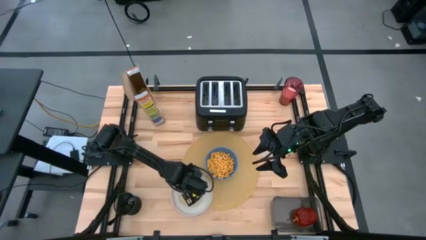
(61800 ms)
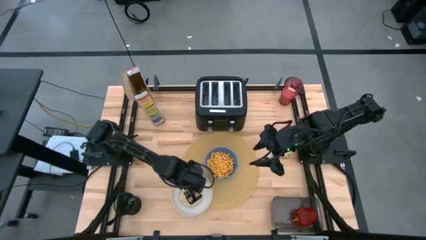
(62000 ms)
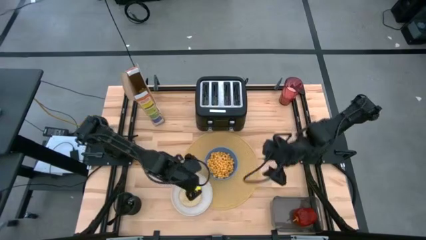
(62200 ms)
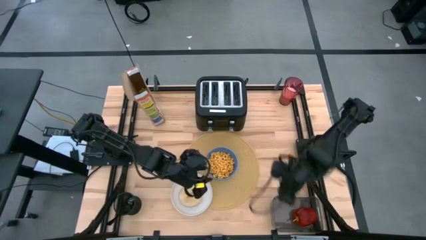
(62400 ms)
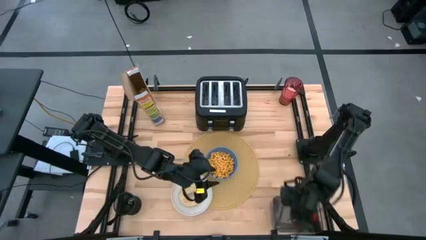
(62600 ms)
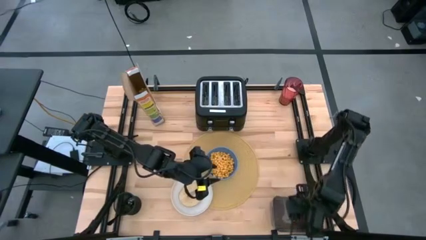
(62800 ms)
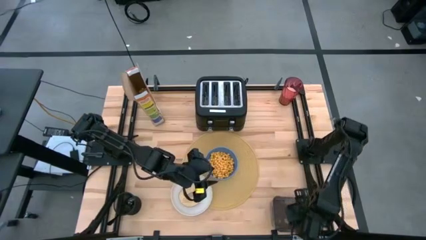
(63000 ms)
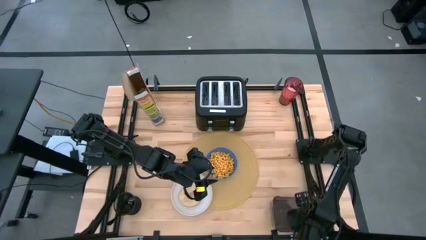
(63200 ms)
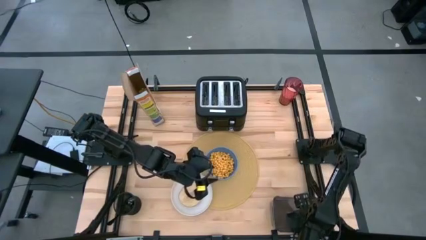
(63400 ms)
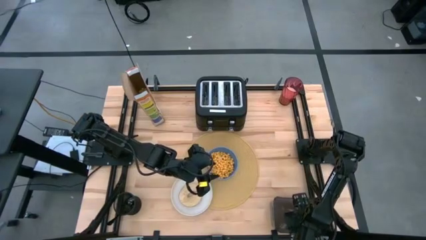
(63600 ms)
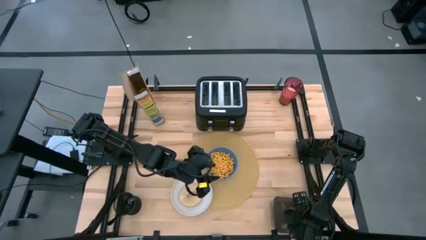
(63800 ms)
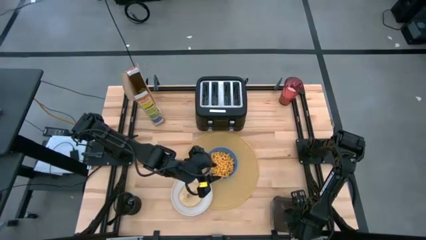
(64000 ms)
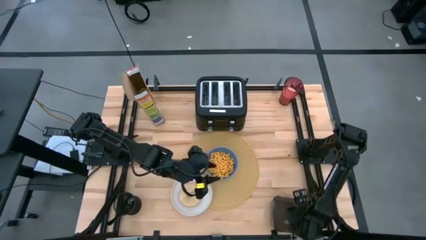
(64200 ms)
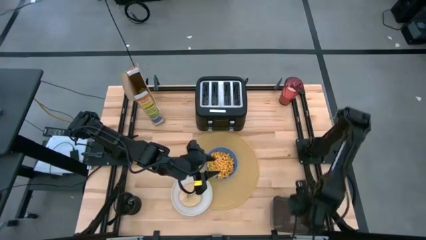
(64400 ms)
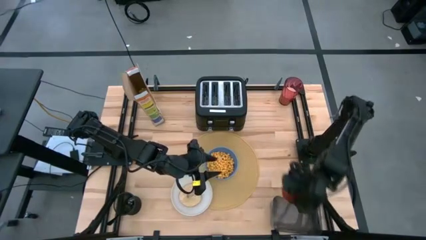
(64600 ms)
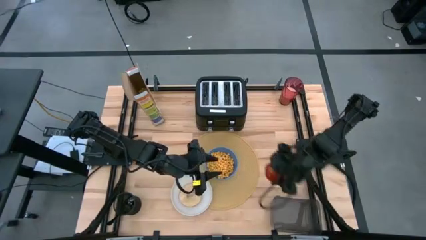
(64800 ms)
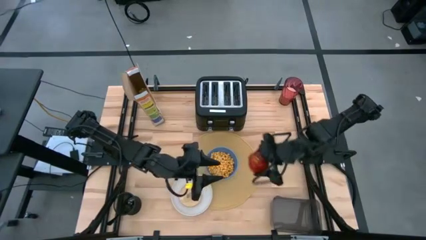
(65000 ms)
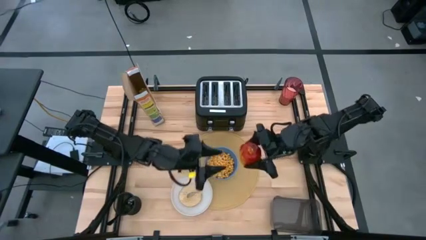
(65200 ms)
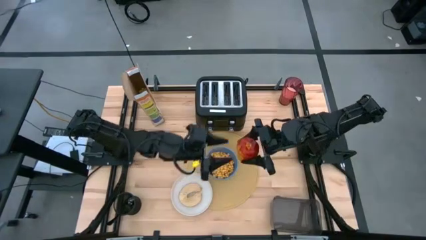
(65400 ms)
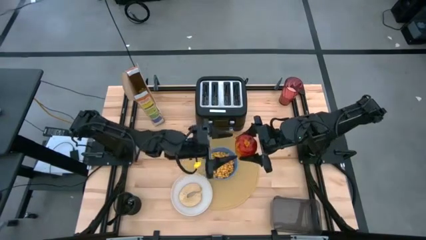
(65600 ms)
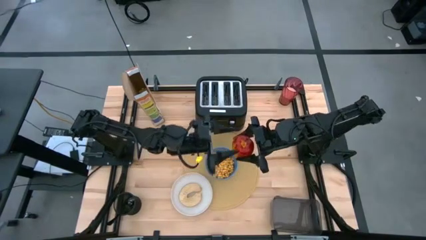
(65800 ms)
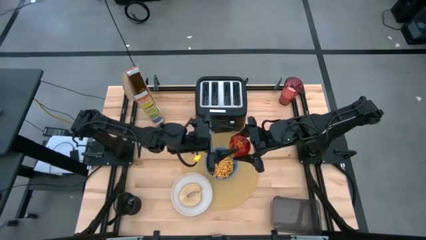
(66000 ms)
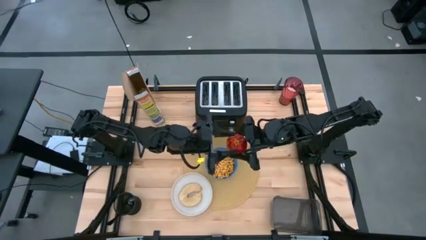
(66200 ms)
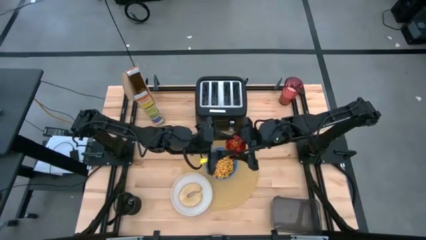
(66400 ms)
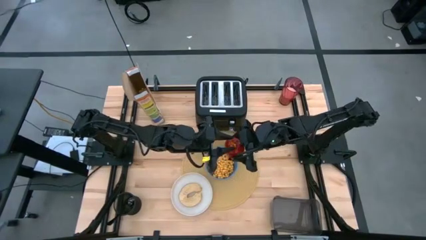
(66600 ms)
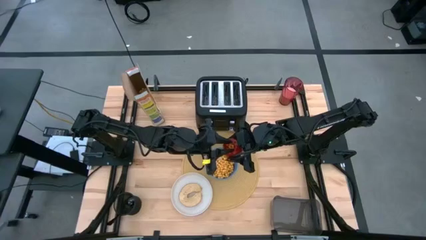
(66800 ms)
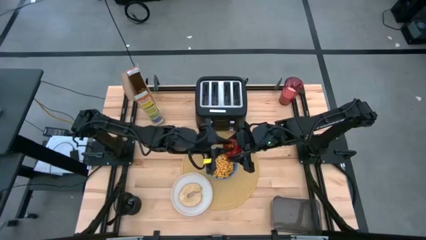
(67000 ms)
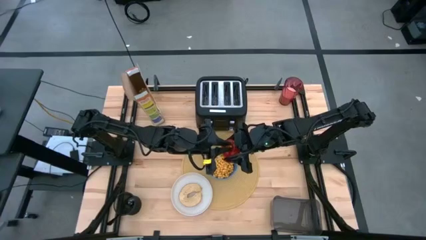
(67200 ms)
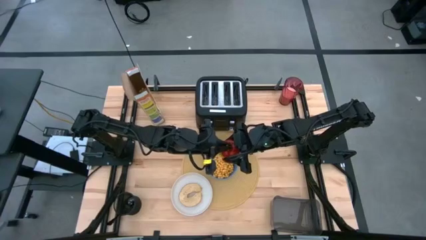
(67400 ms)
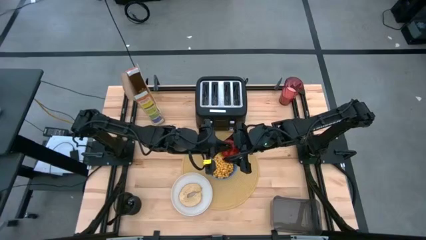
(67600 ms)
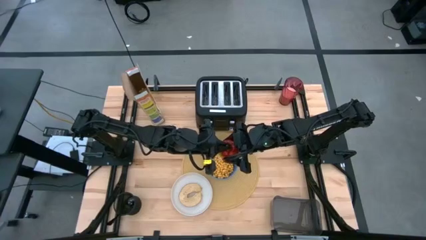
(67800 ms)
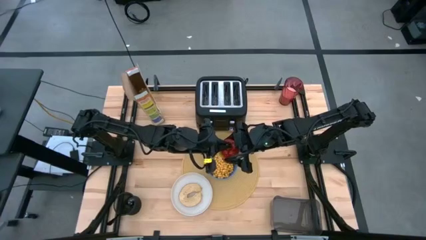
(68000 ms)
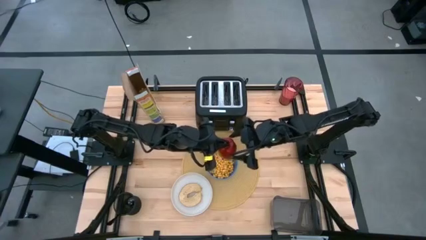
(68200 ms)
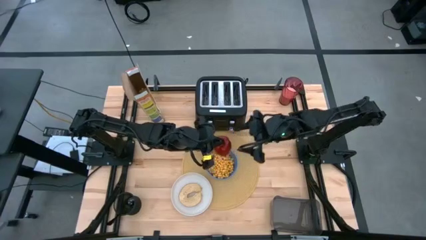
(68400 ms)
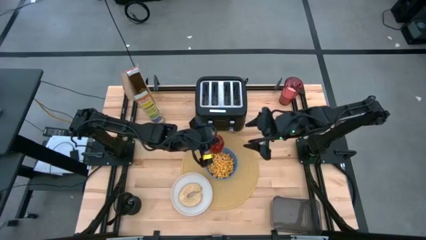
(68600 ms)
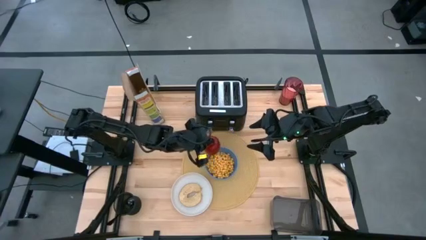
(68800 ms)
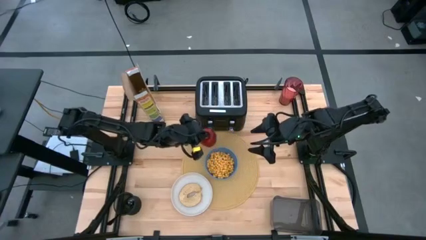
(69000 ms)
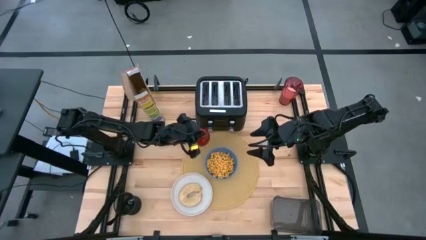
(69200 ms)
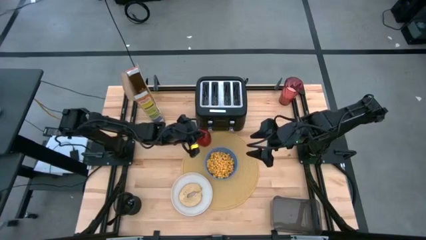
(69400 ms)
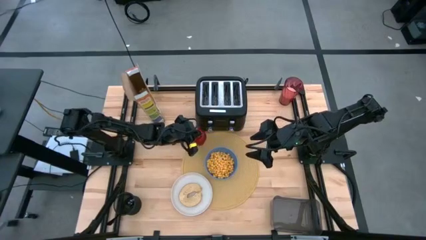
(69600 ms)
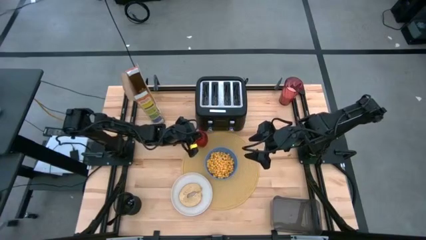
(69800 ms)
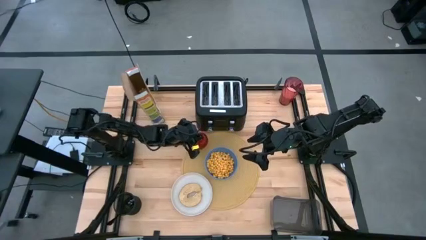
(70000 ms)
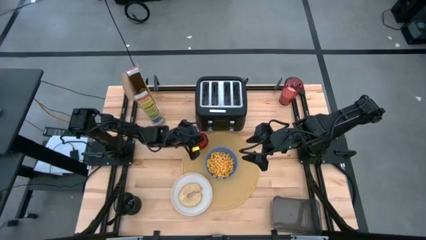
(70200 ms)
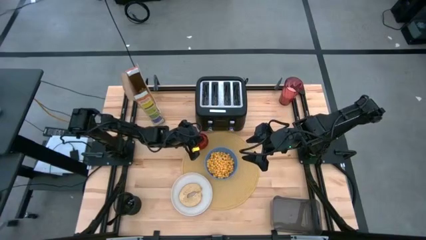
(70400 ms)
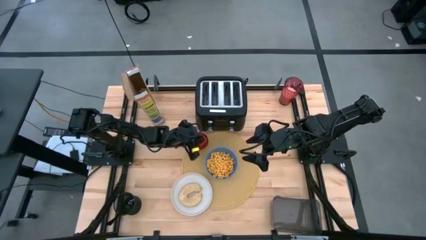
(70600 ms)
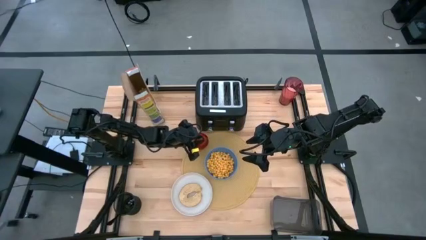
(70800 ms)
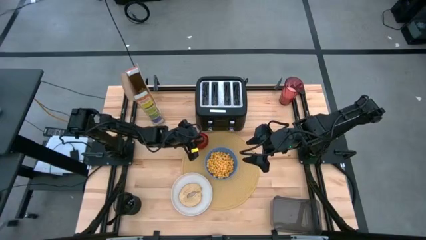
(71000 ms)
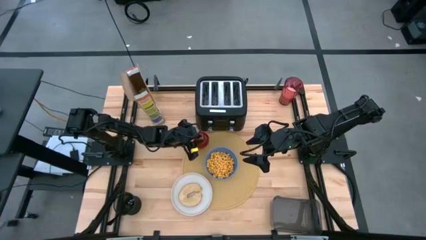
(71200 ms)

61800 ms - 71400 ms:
Task: Arrange a breakfast setting
Put the apple on the placemat to the top left of the bowl

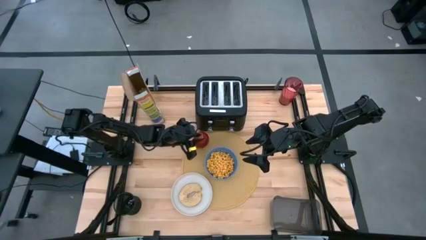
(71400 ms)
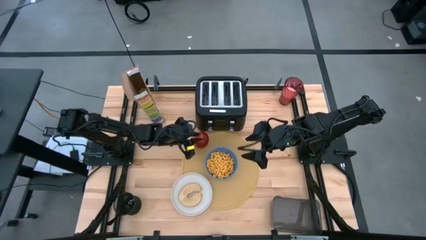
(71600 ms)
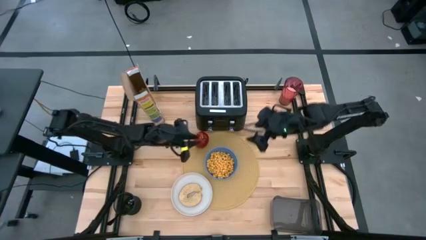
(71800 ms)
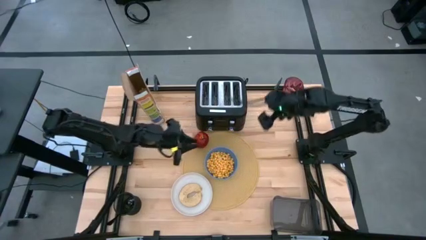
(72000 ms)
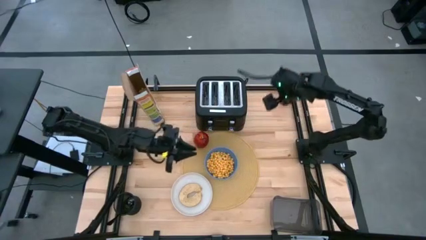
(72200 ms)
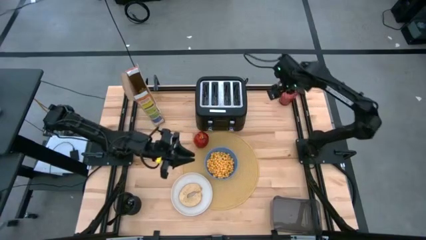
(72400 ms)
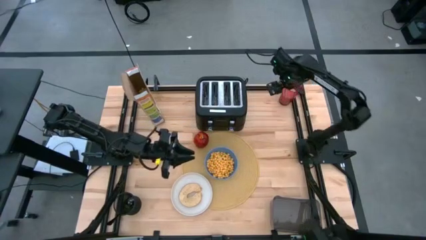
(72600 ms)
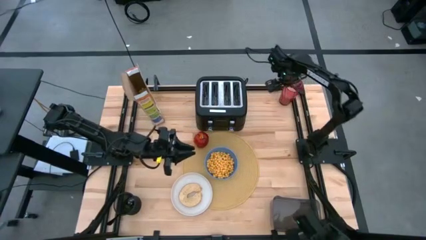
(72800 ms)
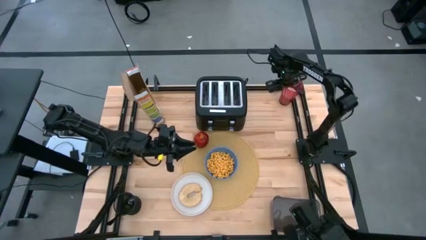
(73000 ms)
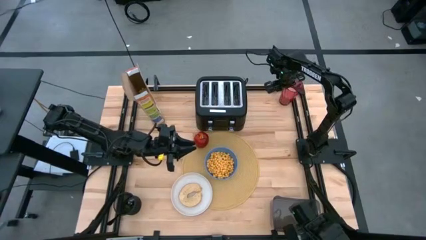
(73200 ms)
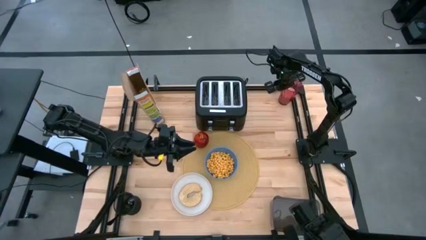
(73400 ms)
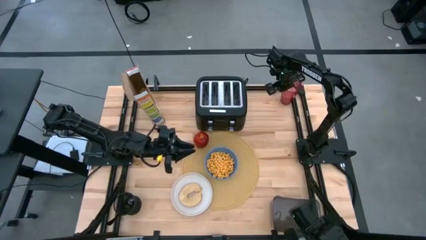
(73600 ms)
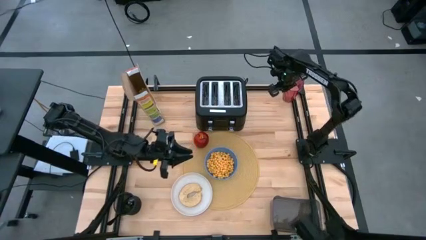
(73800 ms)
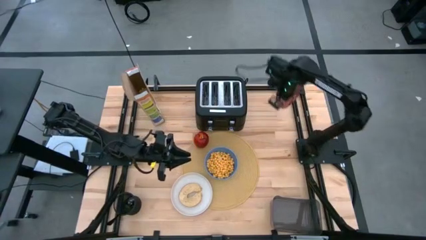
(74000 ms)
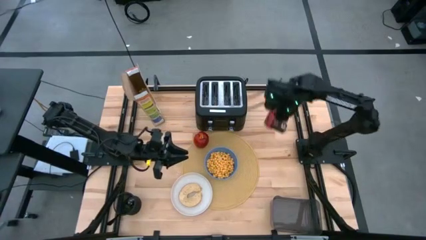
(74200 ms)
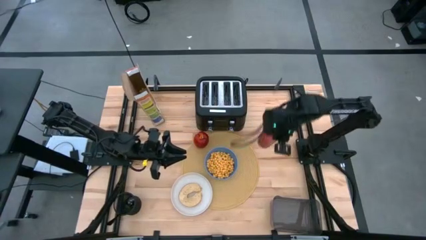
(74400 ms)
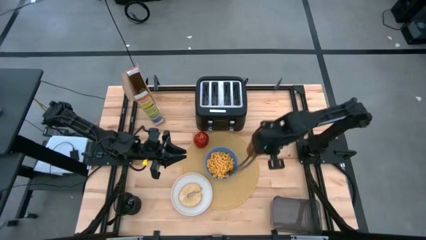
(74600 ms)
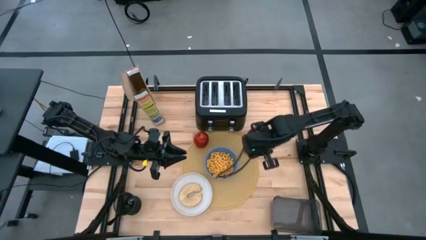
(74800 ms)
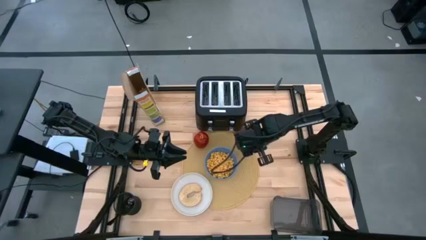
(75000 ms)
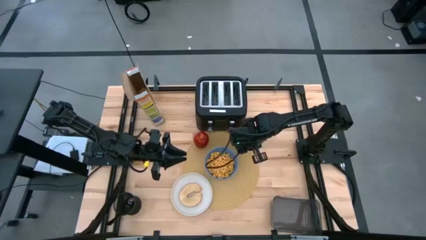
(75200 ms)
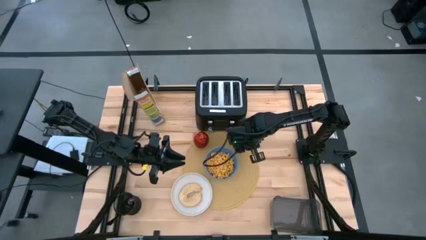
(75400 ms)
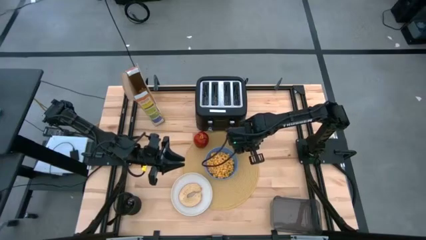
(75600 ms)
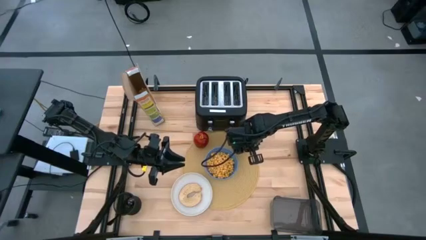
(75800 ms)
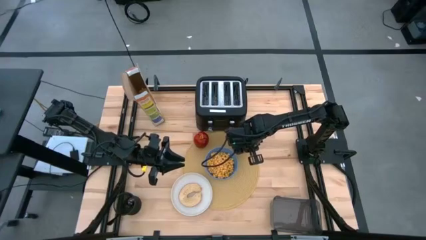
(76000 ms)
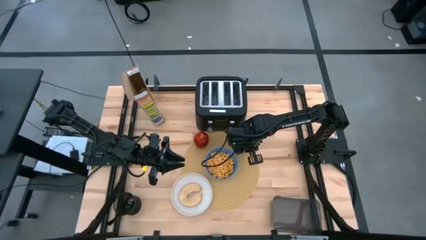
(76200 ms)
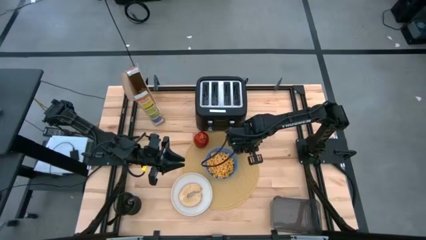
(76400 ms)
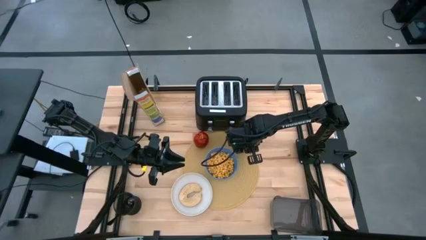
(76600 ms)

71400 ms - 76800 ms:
Put the cup on the placemat to the top right of the bowl
